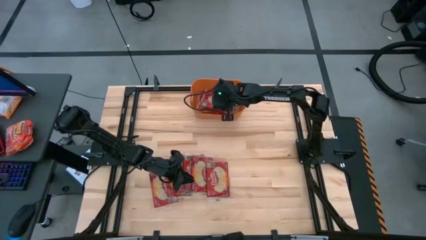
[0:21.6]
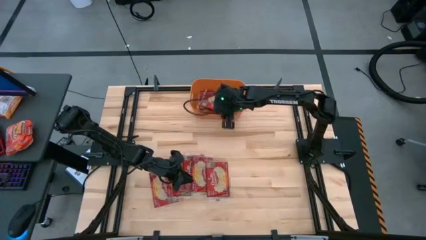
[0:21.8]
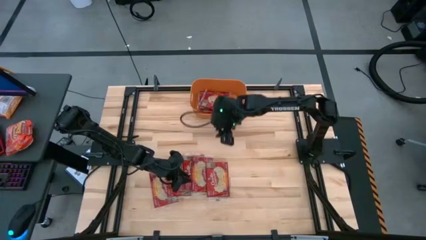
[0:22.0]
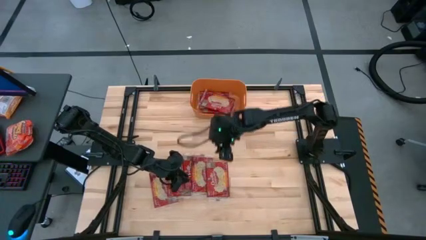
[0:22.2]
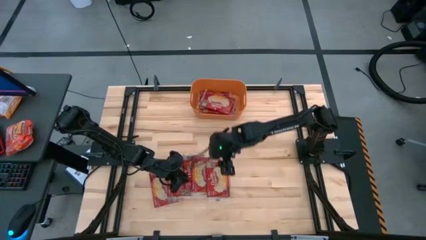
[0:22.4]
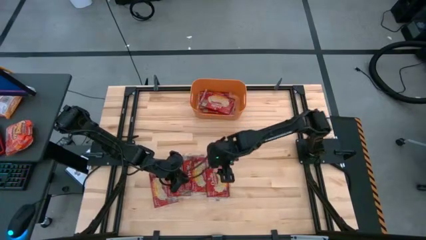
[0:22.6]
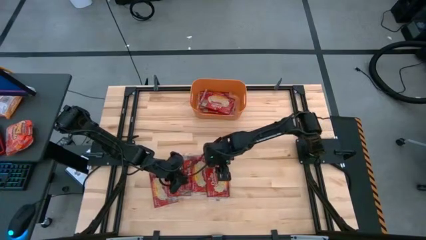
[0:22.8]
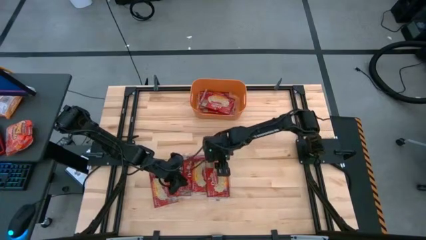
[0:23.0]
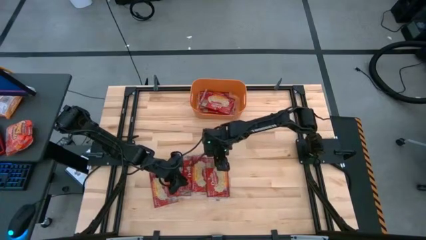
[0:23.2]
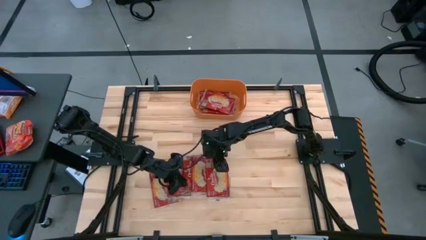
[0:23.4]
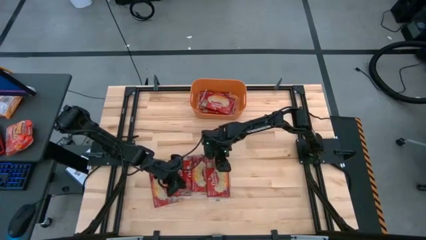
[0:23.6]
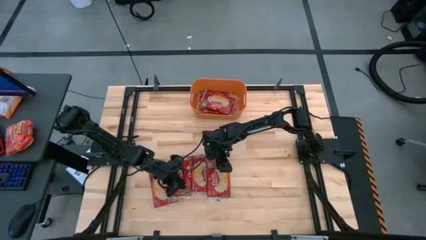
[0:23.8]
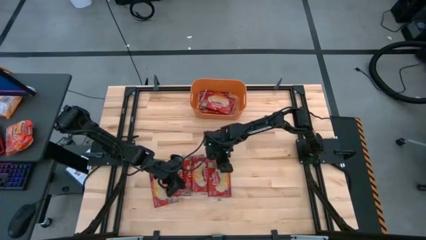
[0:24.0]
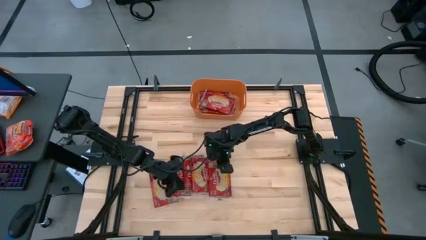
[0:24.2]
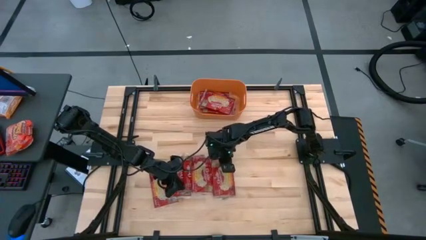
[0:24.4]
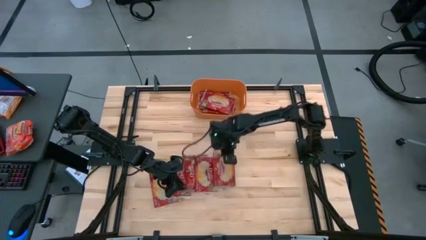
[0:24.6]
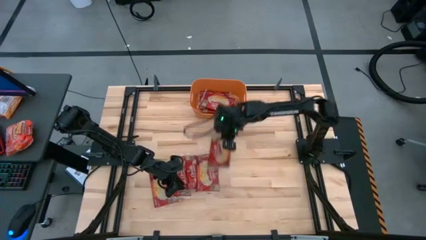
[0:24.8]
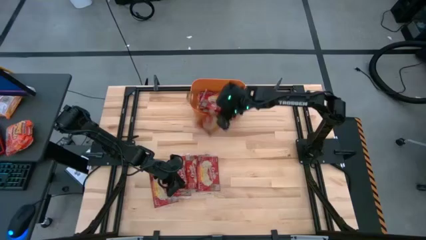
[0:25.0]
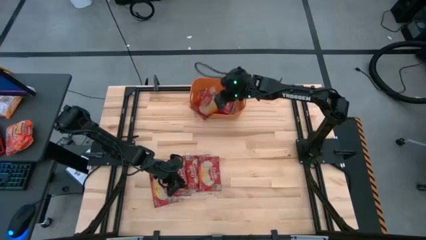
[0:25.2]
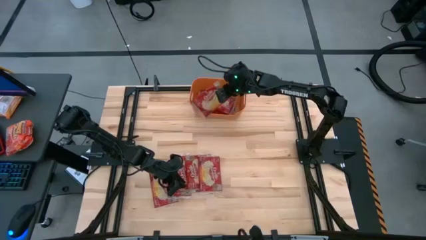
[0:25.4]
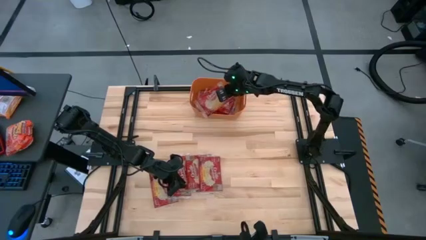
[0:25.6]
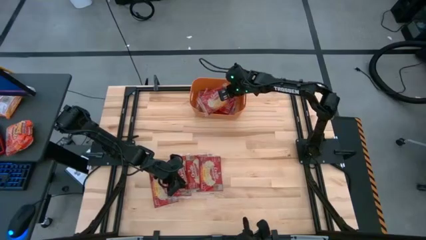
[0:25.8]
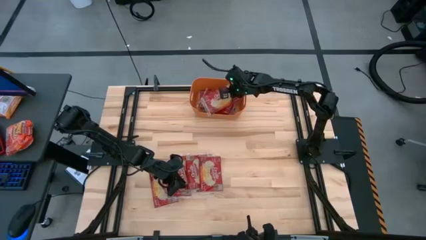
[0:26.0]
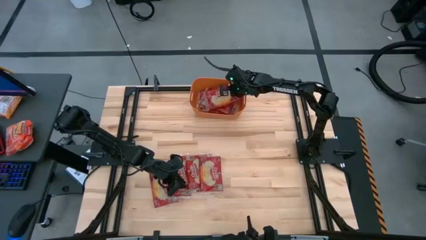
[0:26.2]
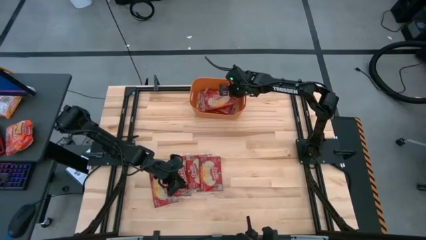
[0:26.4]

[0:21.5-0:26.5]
Task: Sort popcorn bags into baskets
Put the red popcorn bag into the orange bin

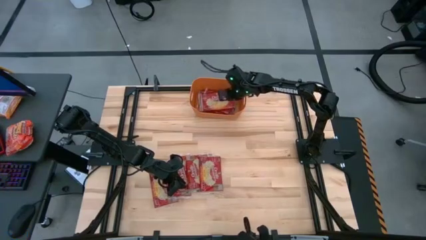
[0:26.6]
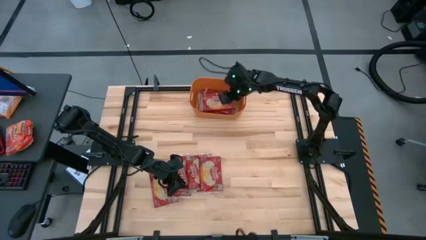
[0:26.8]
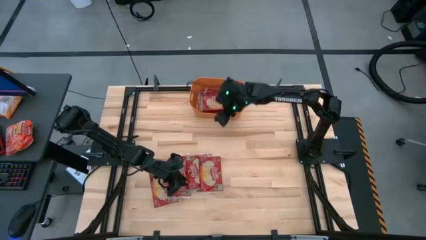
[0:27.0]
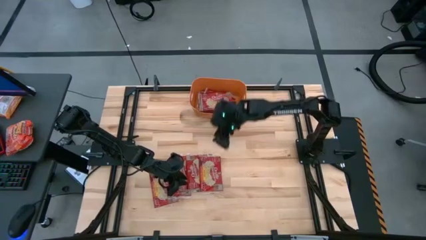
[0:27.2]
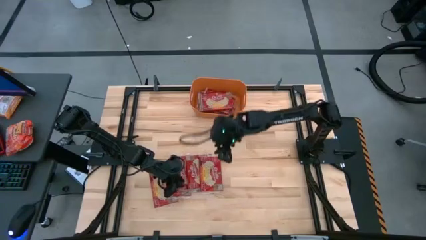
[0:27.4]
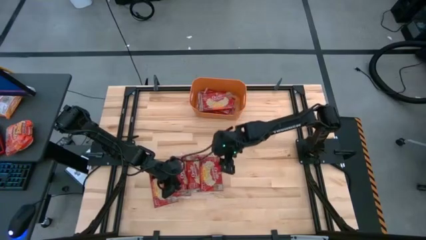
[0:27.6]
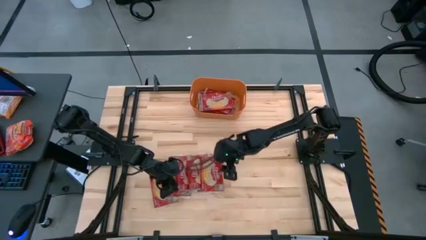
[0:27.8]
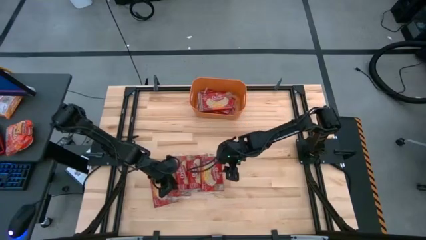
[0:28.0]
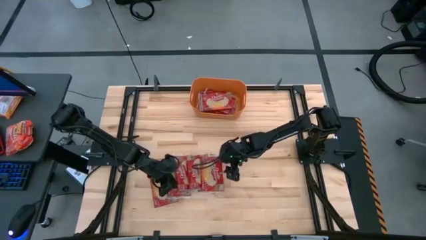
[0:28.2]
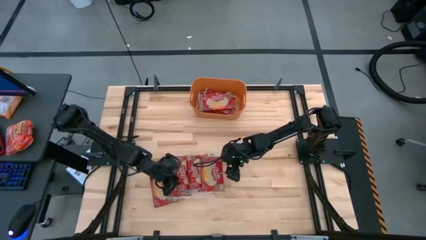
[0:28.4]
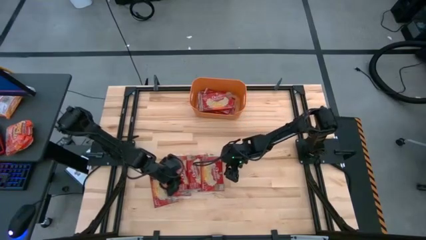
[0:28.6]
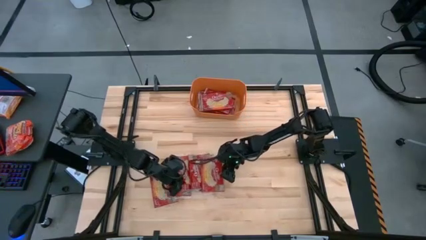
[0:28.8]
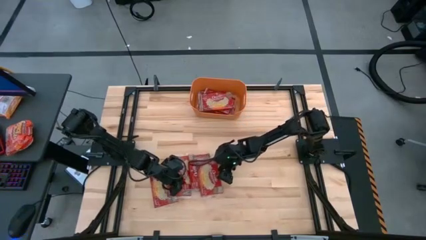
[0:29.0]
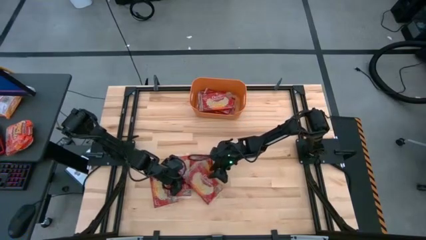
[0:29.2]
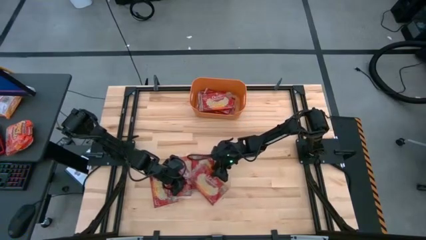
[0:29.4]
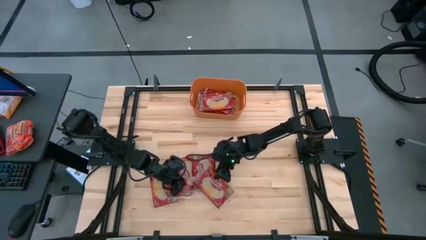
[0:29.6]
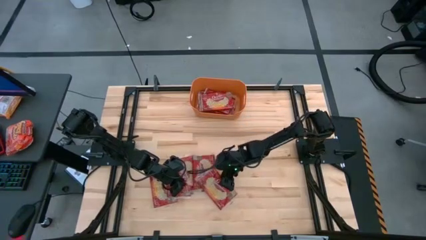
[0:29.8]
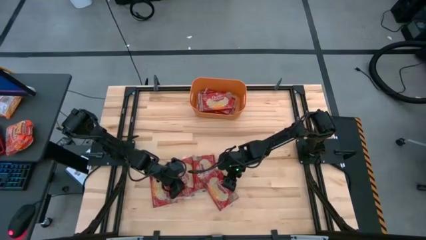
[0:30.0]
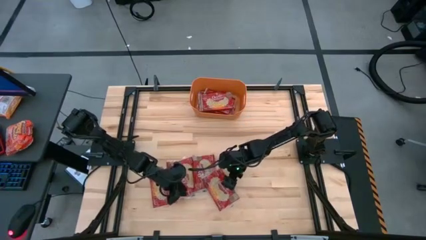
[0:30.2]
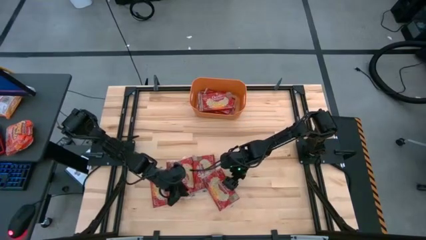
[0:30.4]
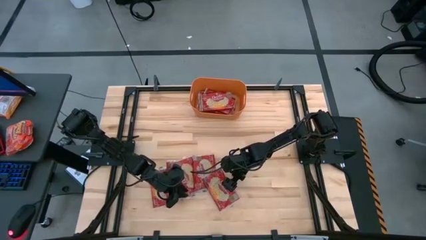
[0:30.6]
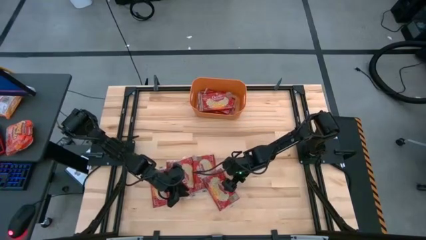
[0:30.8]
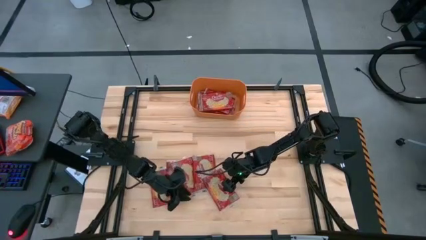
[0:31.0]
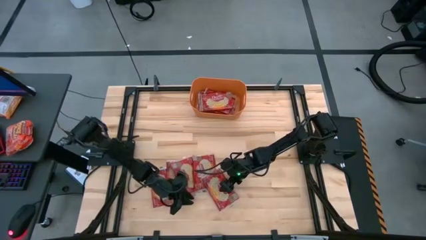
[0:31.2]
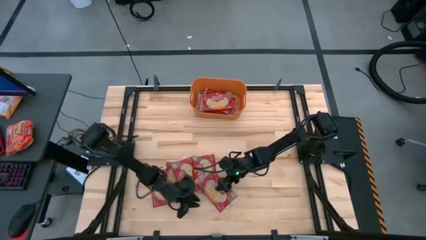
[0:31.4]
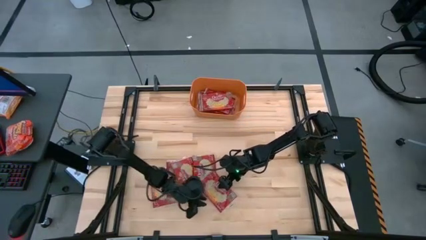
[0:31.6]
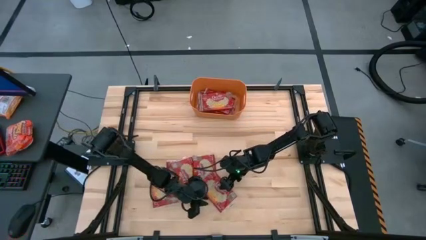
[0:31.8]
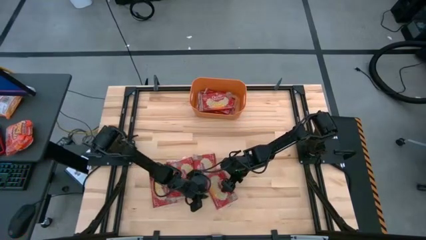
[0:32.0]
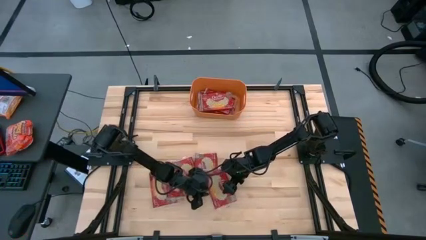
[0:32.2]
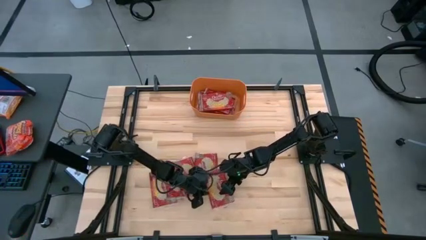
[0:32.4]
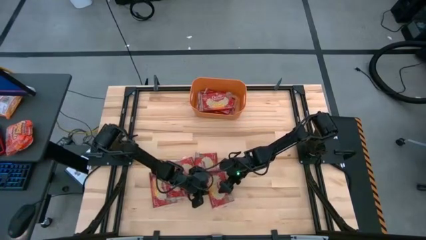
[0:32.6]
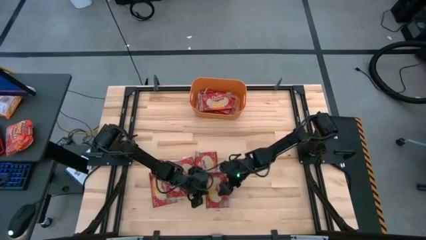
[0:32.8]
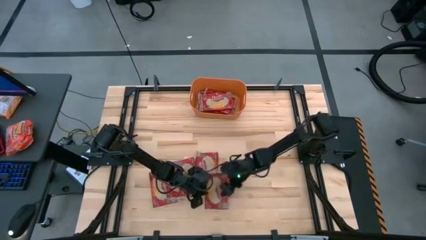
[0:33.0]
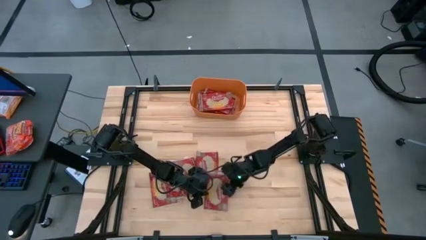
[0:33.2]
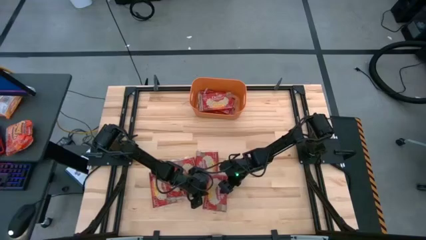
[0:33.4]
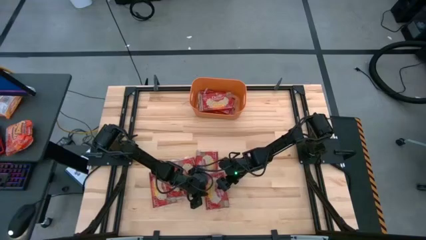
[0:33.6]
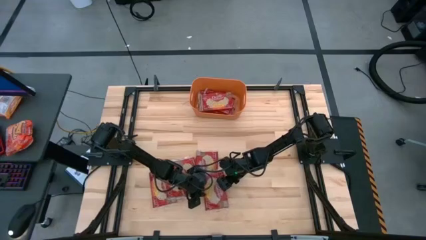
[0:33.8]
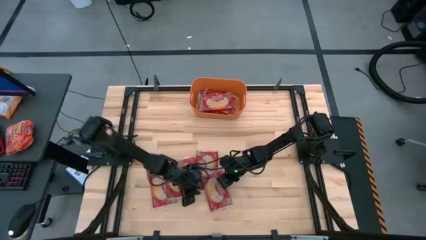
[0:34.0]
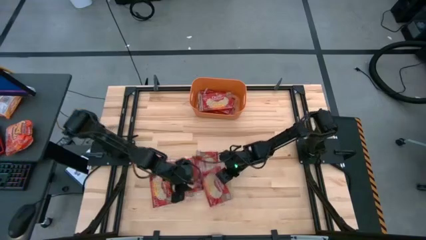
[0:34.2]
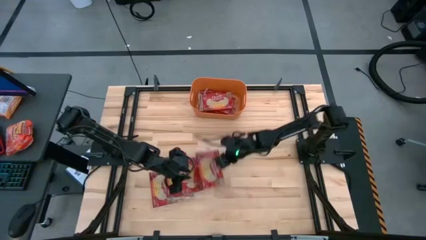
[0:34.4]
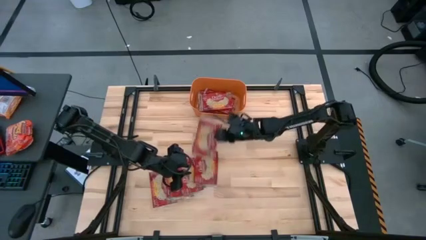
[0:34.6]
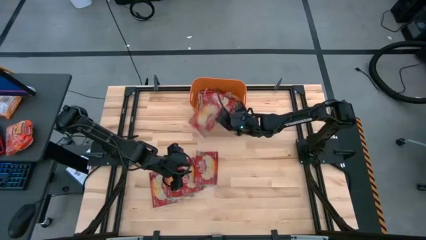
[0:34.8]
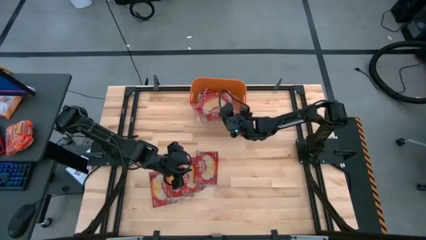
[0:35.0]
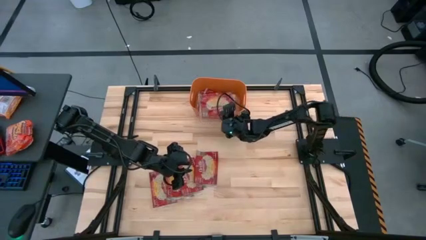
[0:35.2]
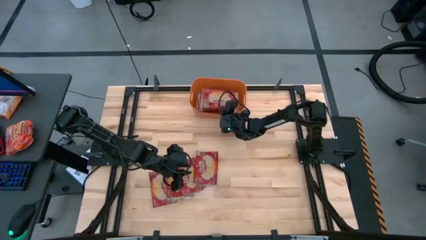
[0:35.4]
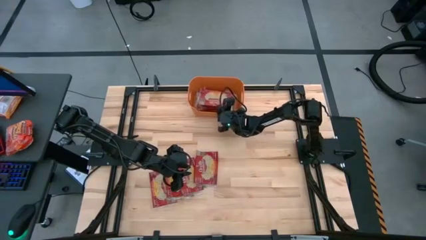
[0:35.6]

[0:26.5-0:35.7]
Put the red popcorn bag into the orange bin

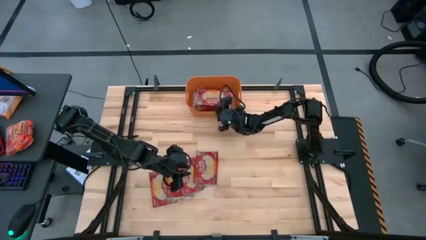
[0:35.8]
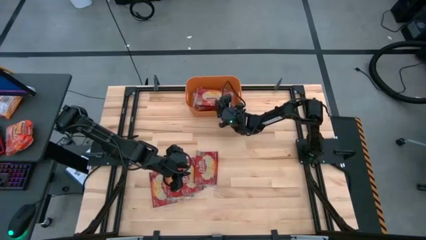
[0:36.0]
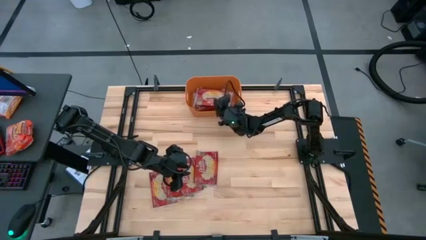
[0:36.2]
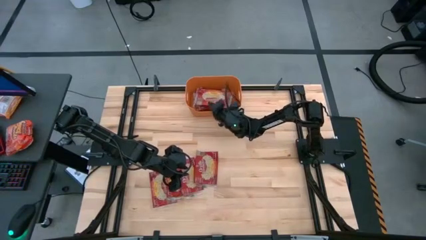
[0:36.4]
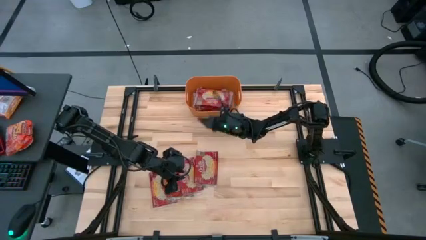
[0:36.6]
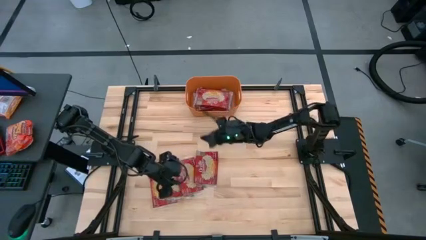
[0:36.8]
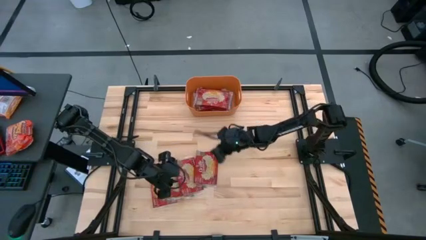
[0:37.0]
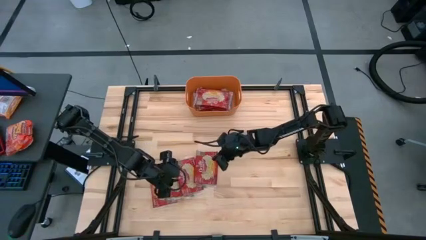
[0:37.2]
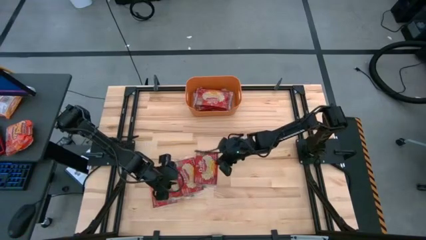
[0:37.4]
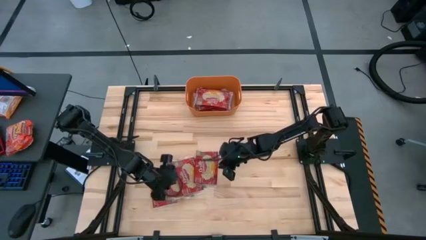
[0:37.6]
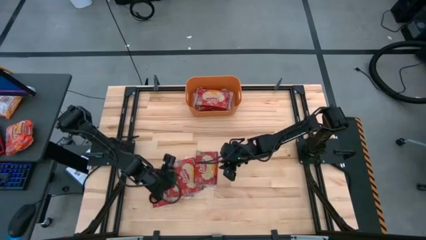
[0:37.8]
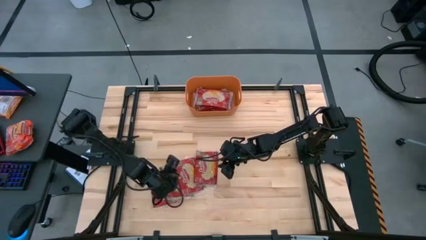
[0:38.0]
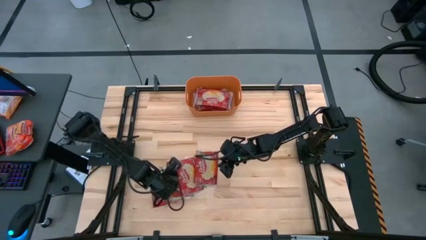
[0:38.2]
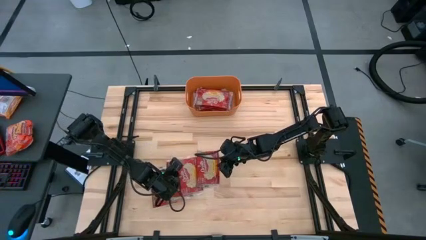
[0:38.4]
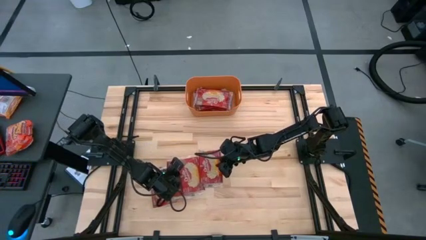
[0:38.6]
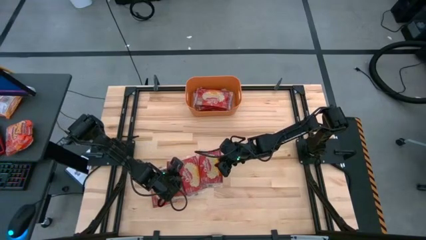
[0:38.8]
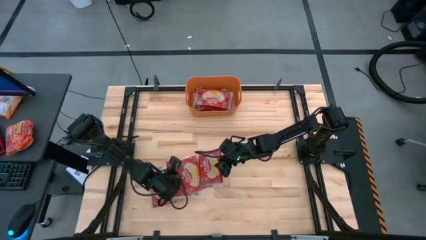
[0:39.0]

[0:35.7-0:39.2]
Put the red popcorn bag into the orange bin
